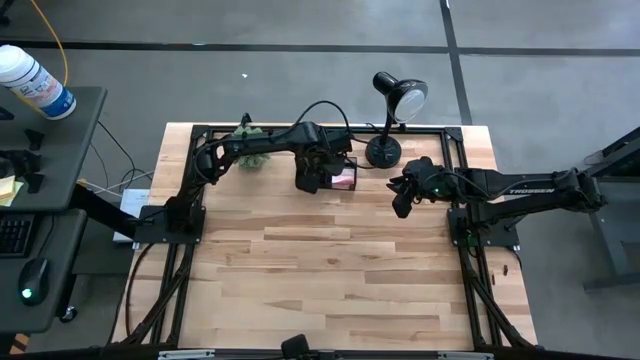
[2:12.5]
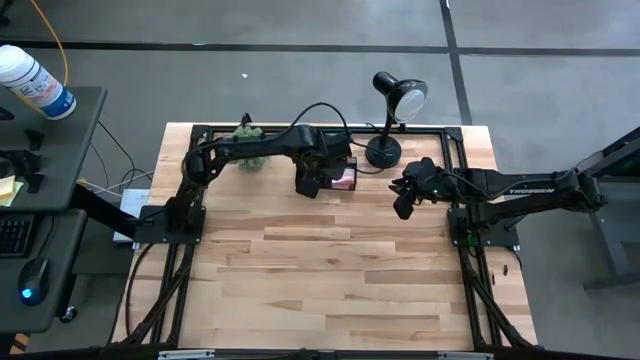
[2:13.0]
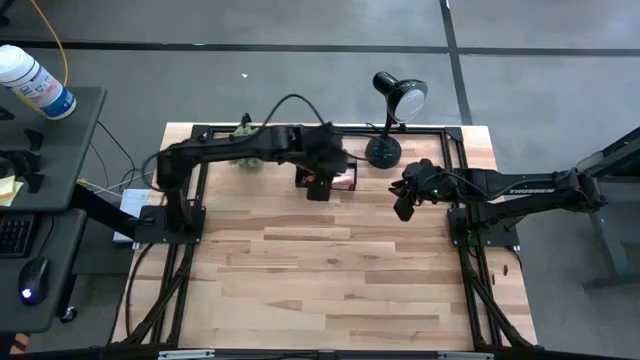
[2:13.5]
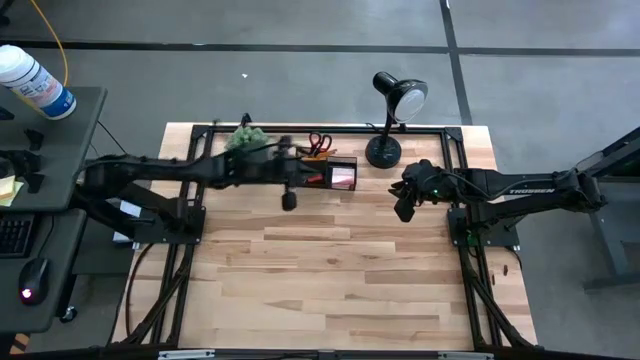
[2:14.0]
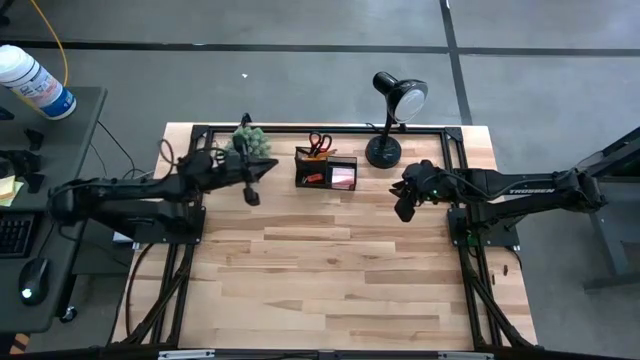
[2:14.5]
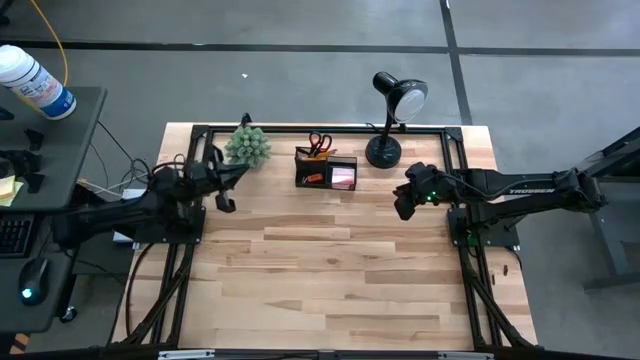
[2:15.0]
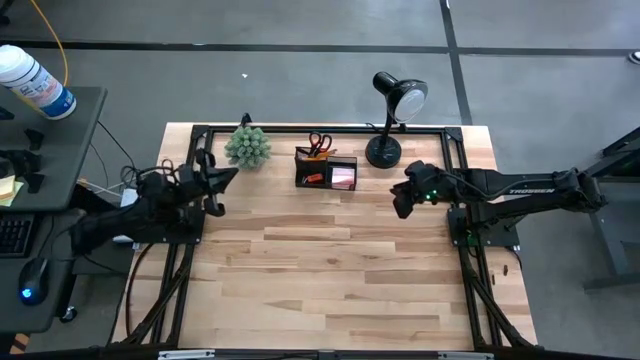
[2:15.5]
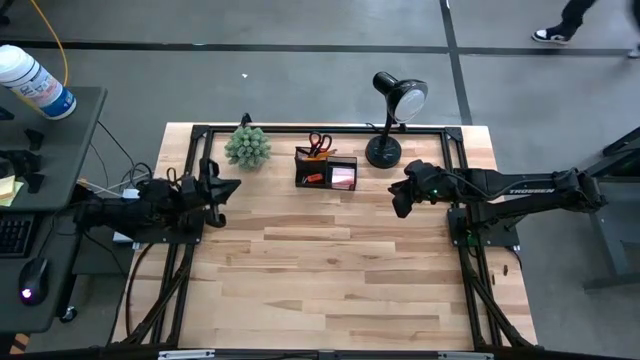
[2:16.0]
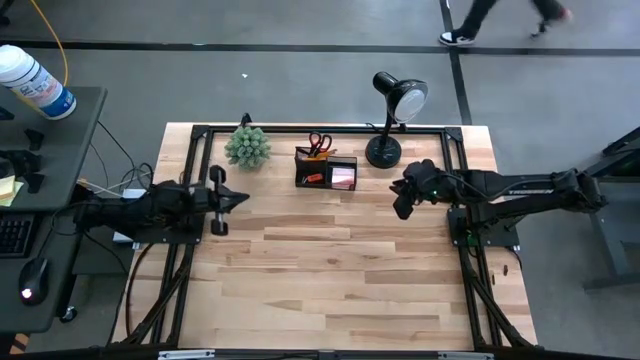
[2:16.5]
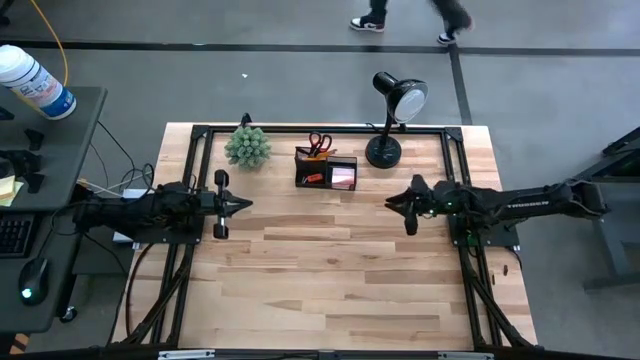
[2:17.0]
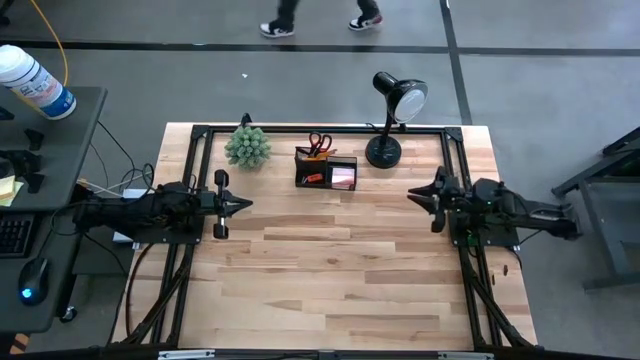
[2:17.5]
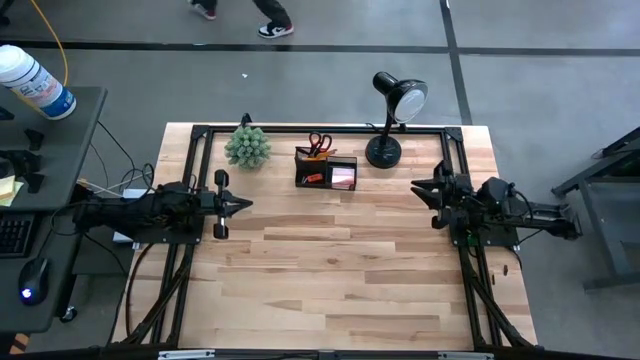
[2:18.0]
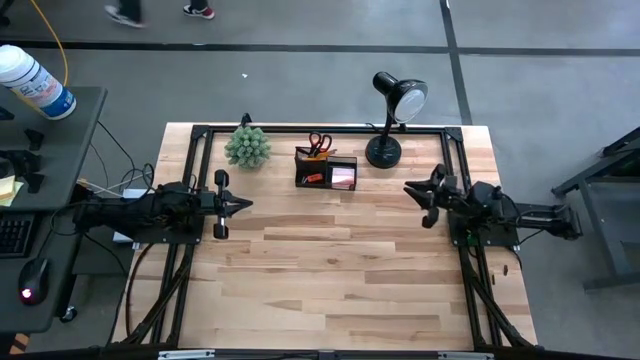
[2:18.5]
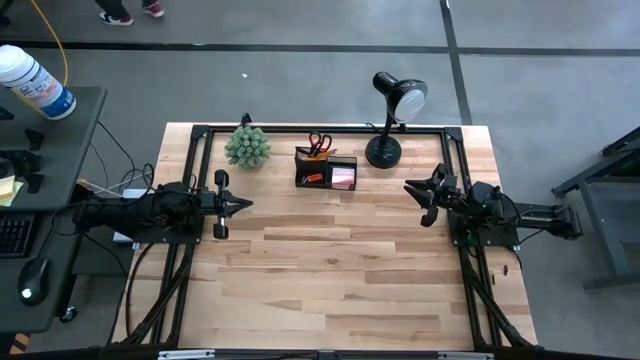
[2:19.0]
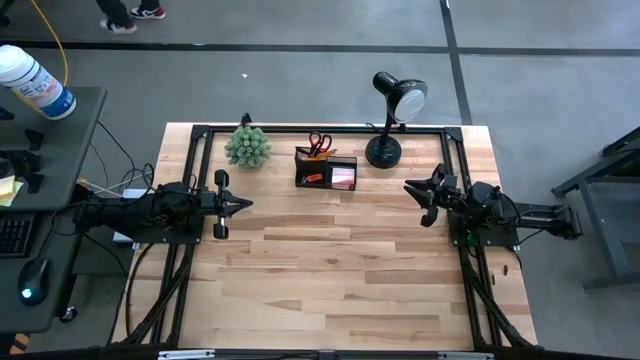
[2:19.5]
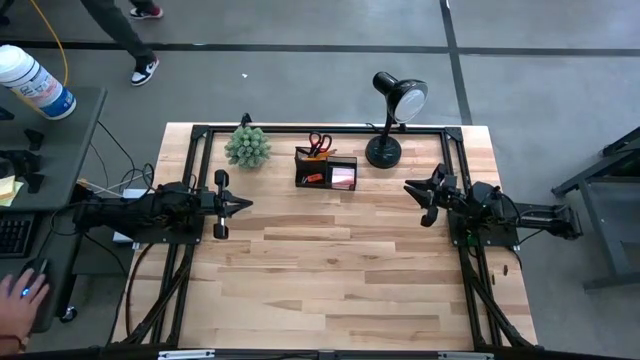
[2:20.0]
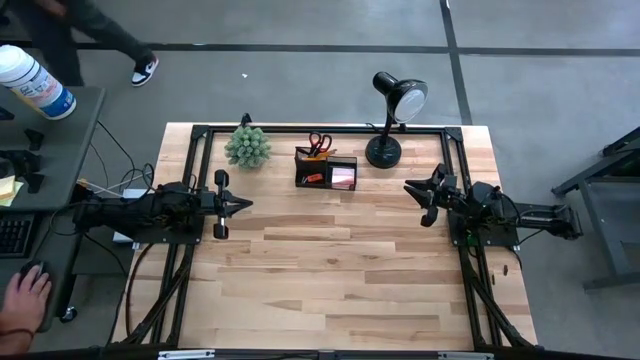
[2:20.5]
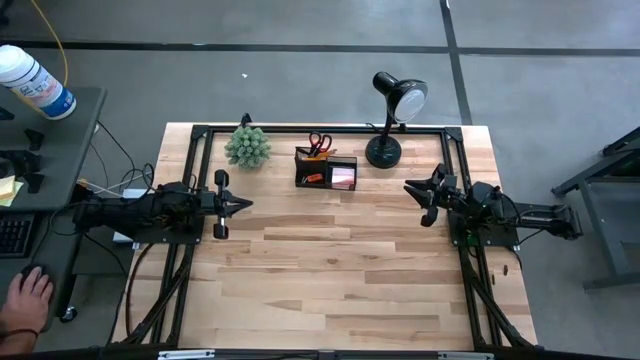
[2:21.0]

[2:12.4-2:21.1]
Task: Pick and place office supplies into organizer
Return to Home Position

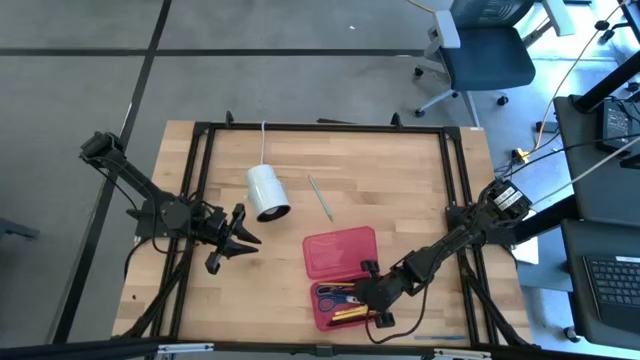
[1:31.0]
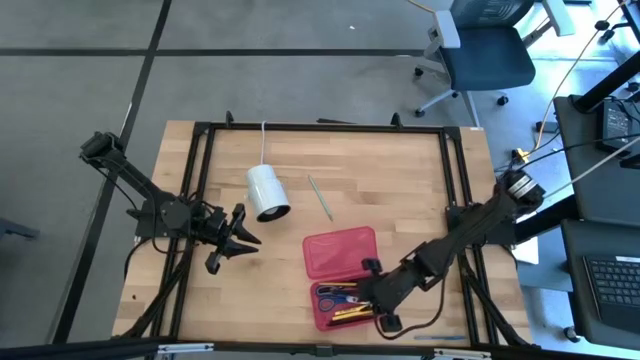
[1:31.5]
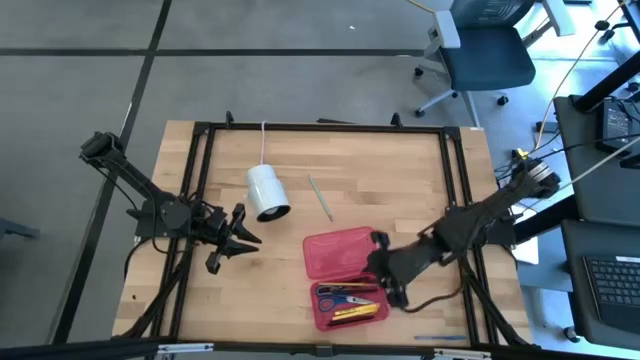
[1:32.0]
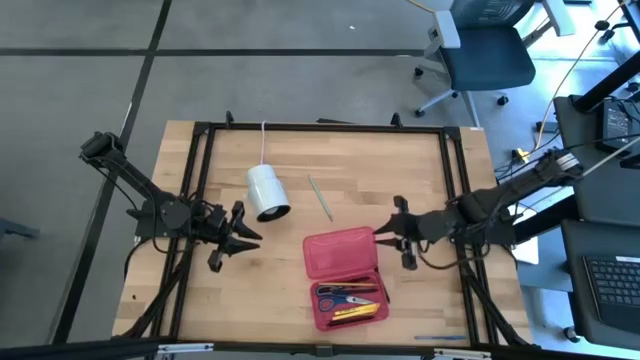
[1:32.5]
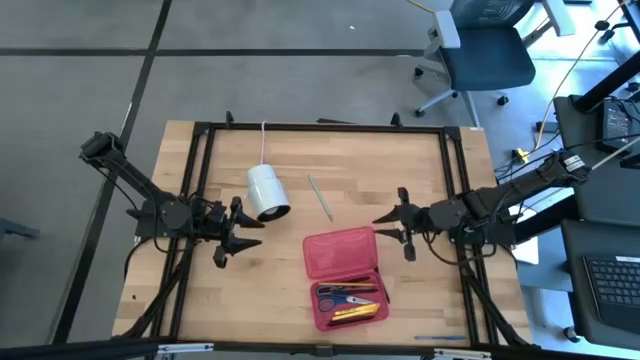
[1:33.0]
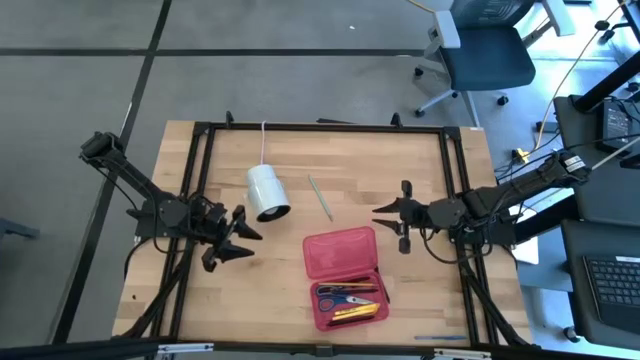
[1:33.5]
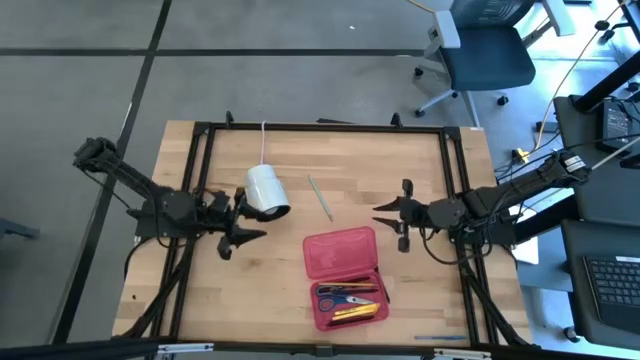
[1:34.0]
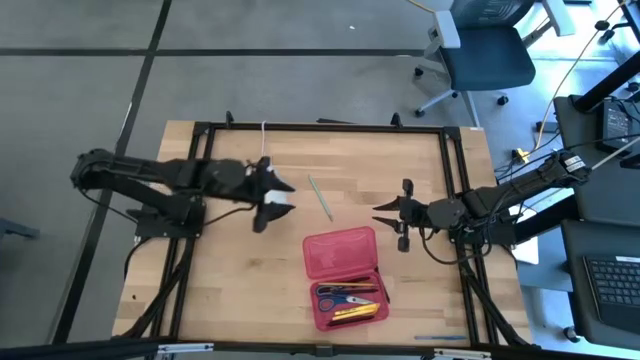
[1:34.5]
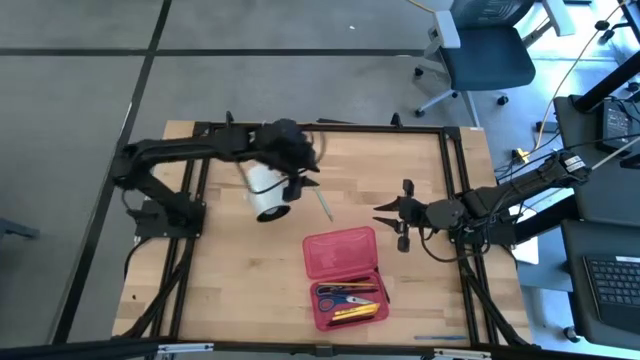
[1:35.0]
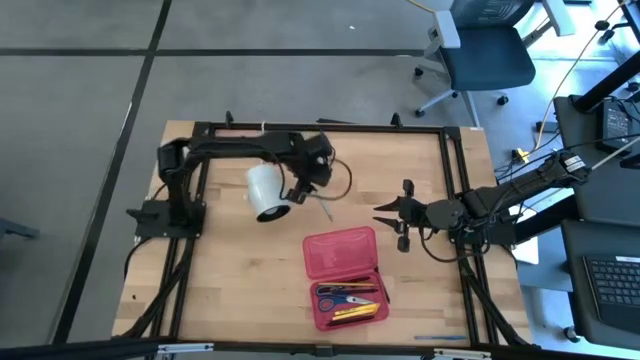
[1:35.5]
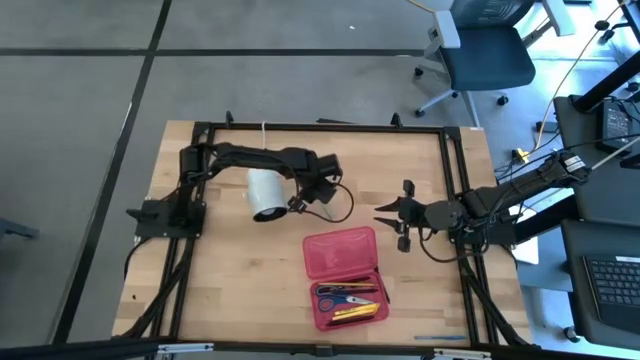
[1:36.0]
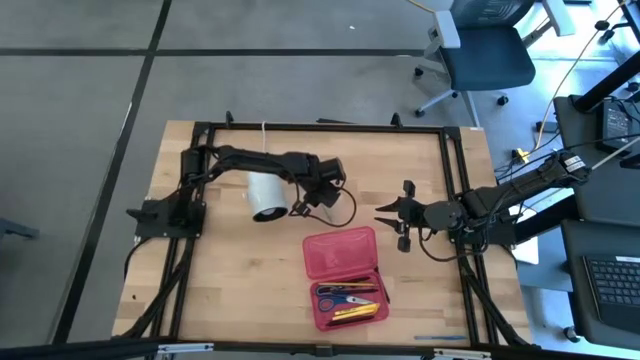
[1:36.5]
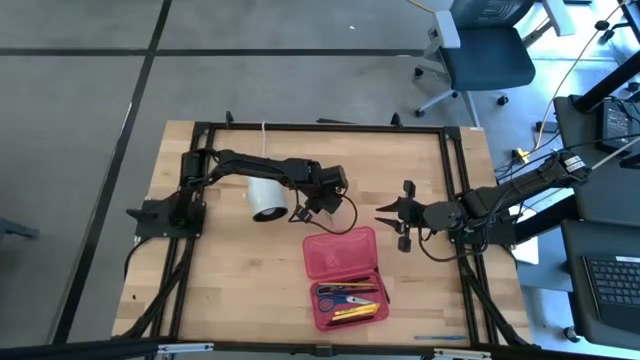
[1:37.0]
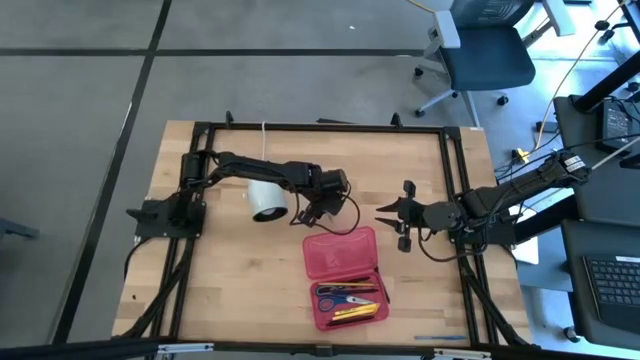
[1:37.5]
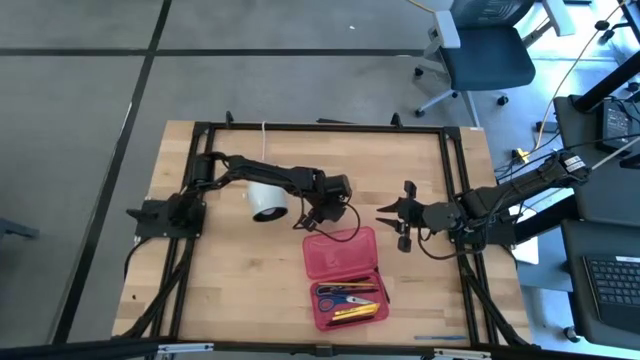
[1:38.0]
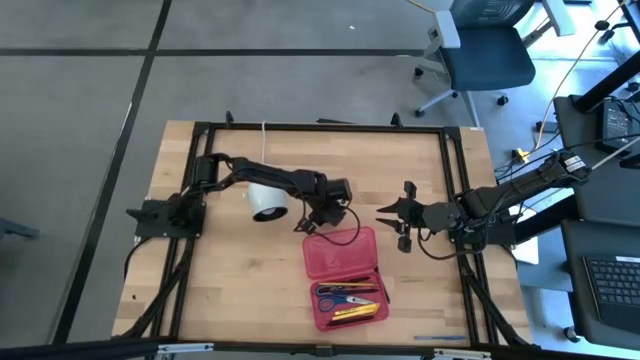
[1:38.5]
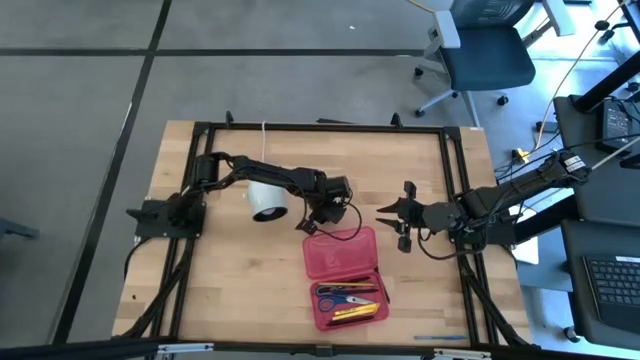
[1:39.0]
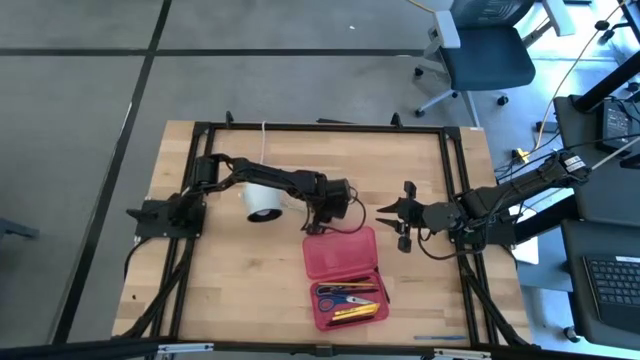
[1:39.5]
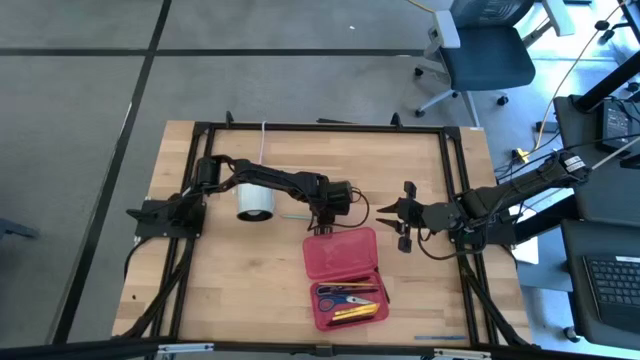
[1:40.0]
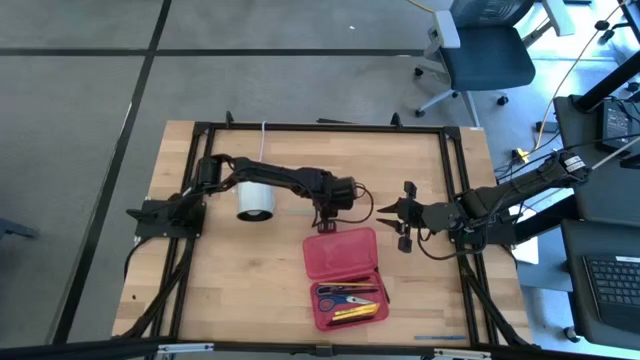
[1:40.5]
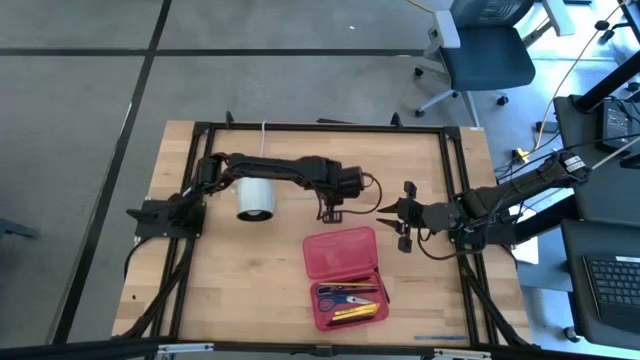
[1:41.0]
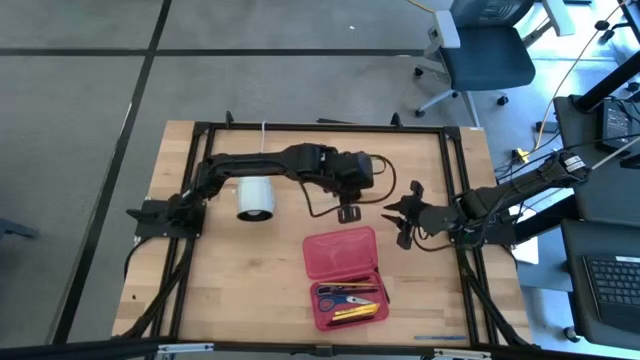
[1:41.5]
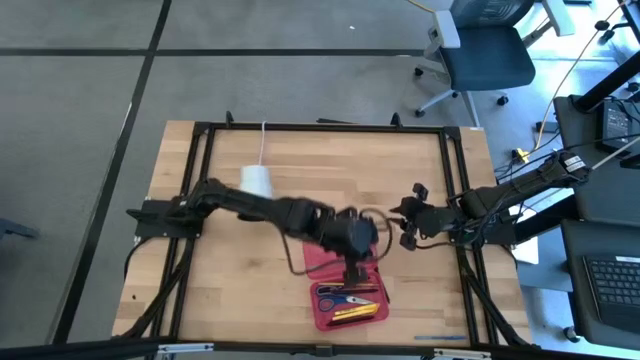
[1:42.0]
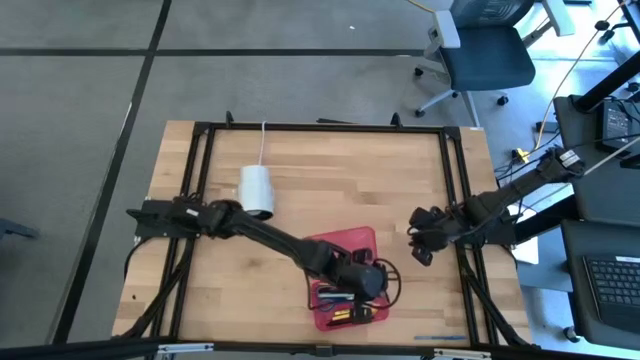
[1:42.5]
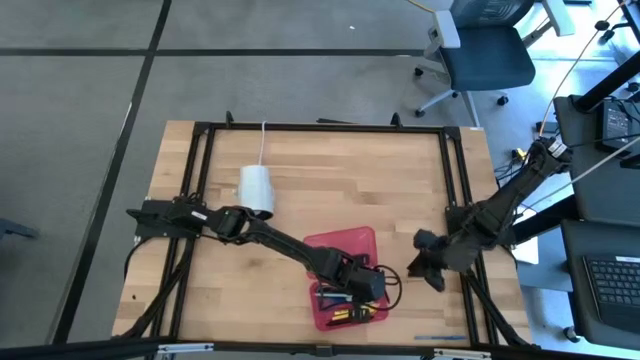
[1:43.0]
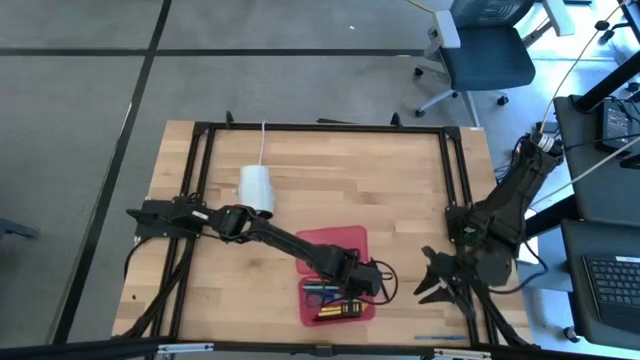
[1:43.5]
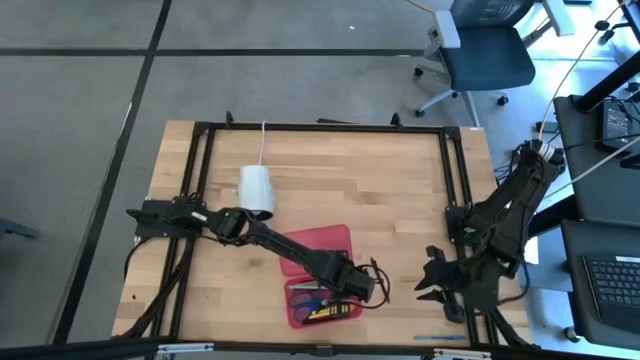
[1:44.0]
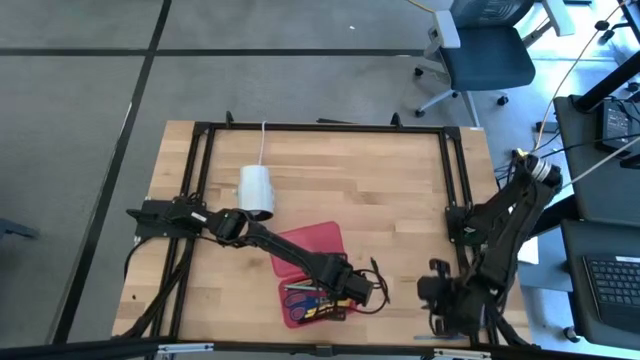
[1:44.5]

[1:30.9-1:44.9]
Task: Pick & place school supplies into a supply box
Put the light blue pencil into the pink supply box
